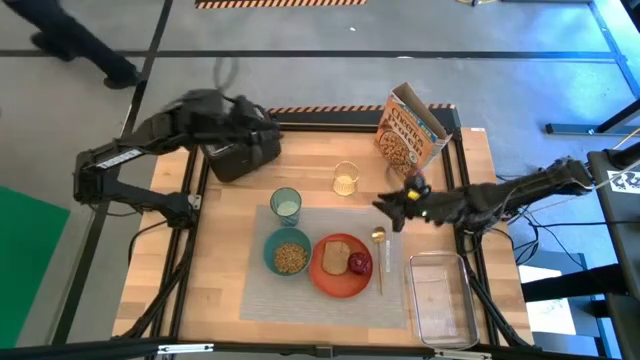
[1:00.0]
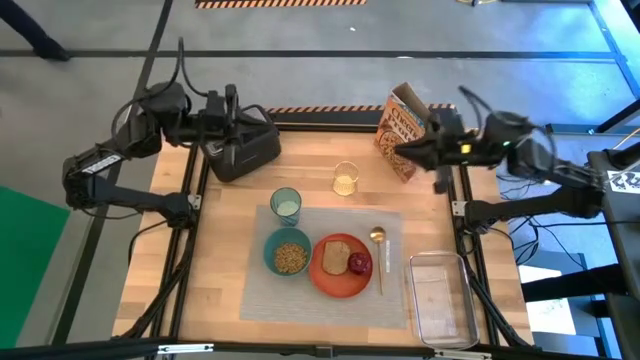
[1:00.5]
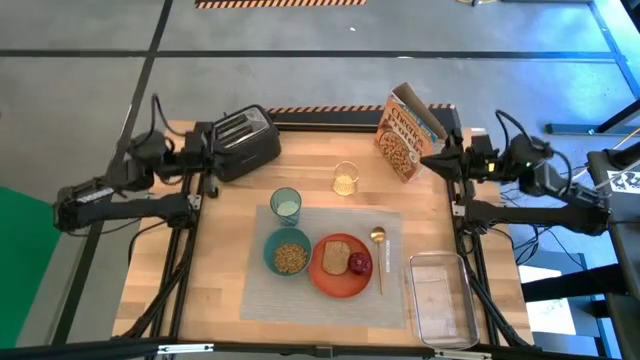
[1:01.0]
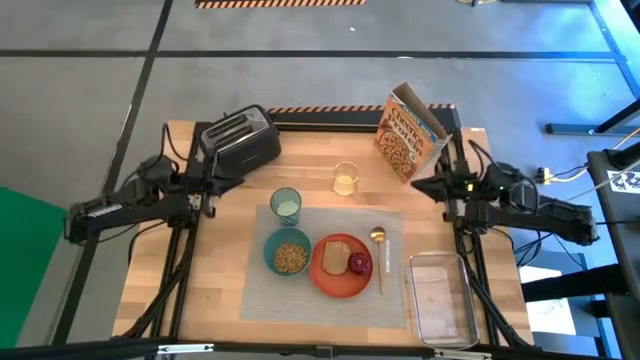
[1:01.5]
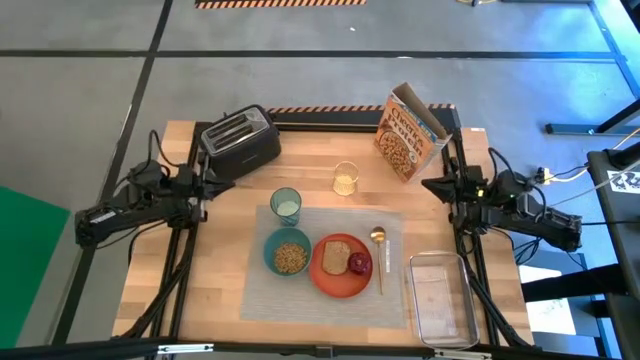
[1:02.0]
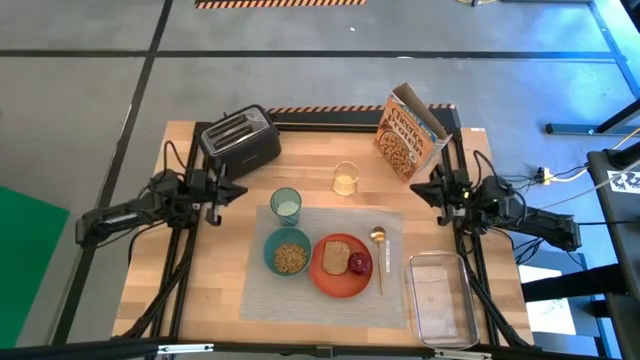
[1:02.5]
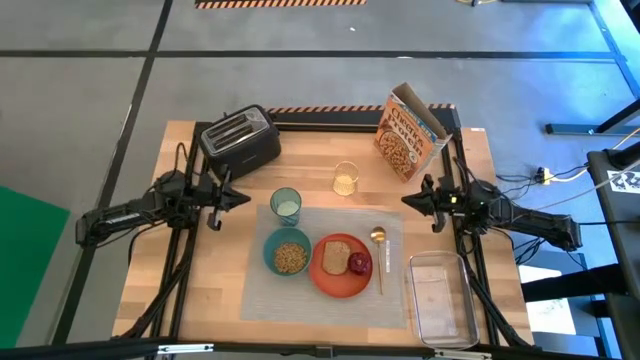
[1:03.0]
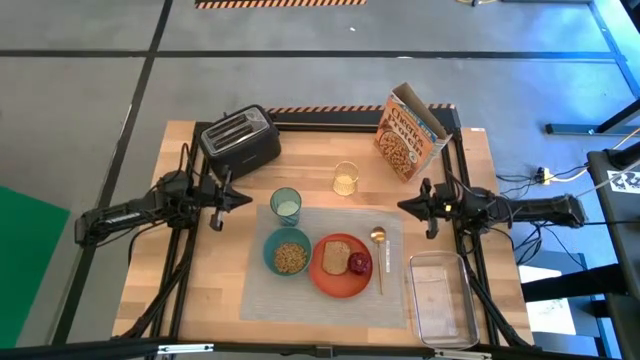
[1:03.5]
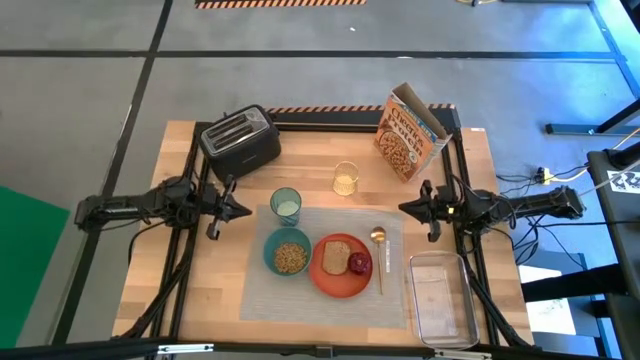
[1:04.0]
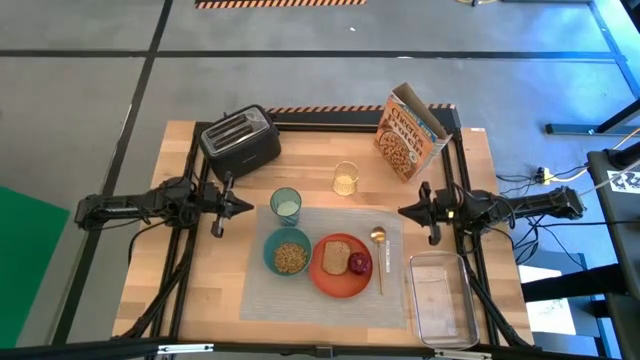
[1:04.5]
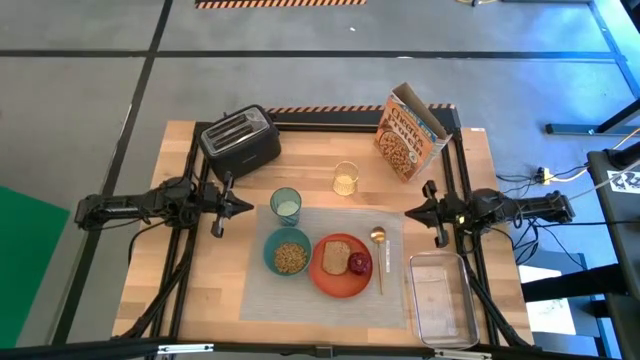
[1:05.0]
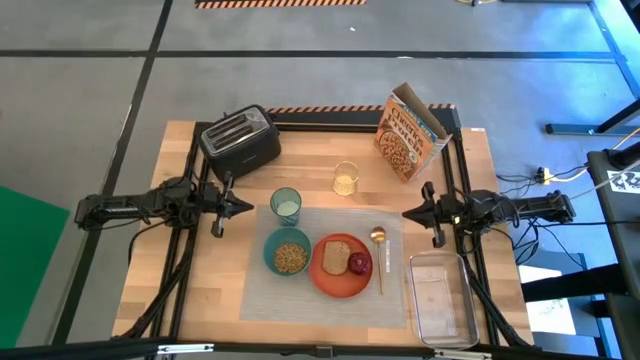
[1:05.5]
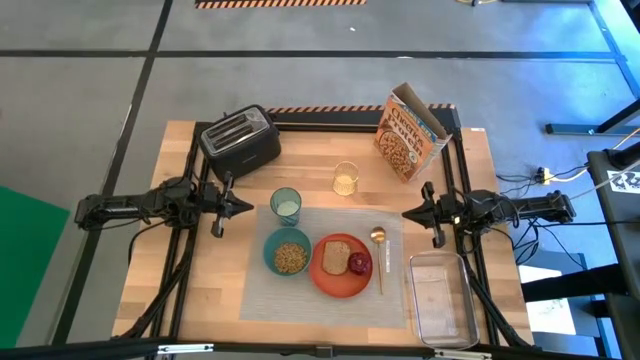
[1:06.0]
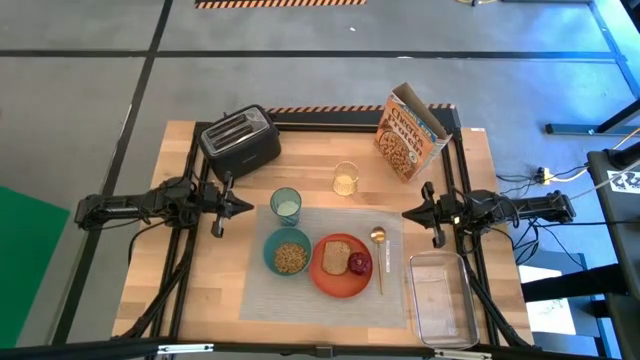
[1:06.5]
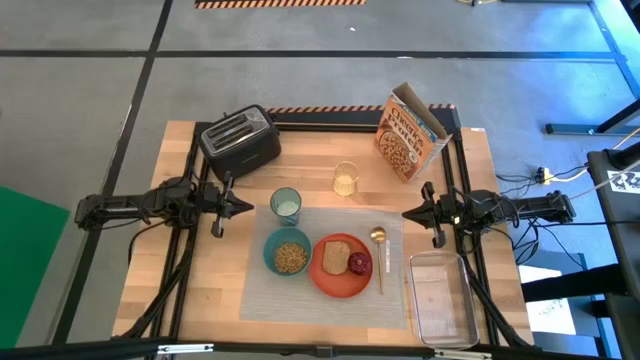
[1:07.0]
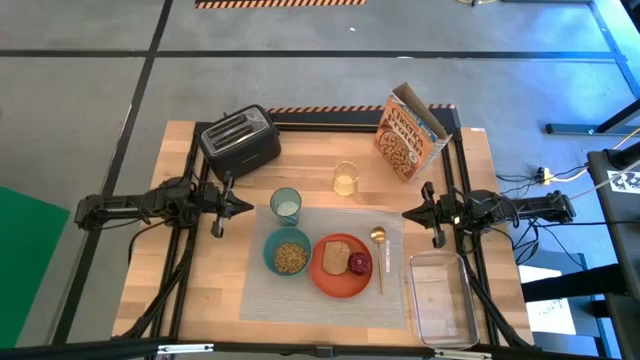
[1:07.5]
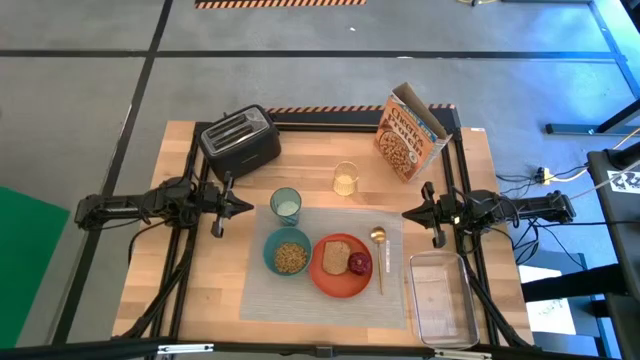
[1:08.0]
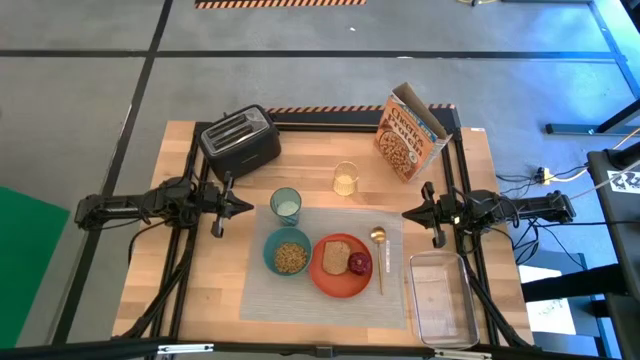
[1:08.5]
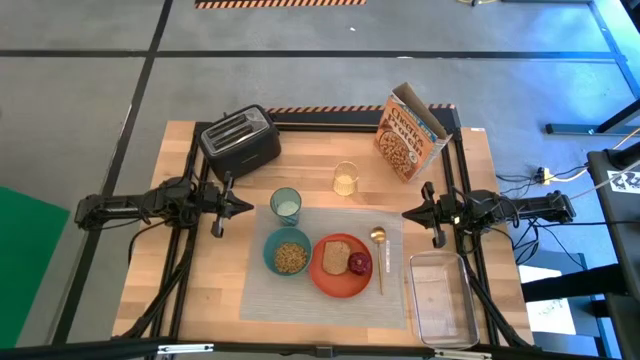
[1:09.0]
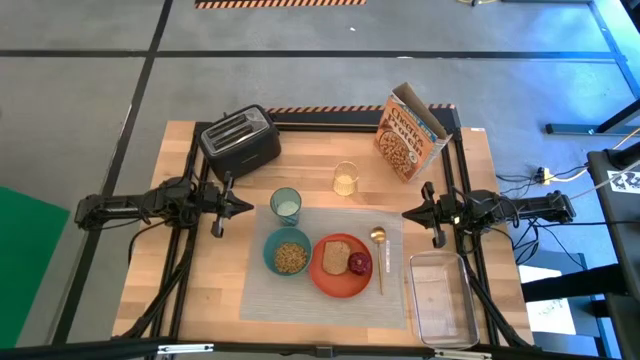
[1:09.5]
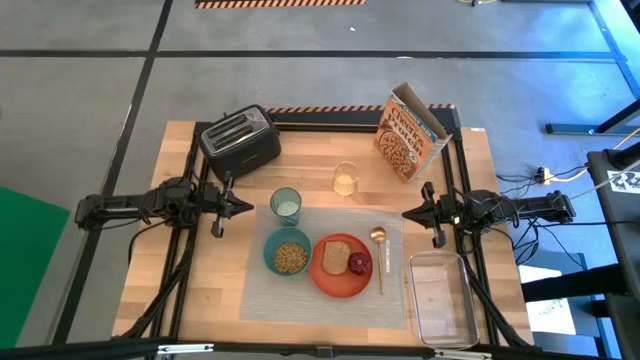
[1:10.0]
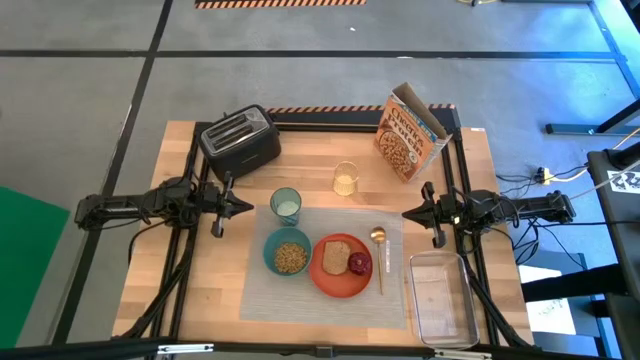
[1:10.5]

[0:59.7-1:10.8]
Task: Arrange a breakfast setting
Return to Home Position

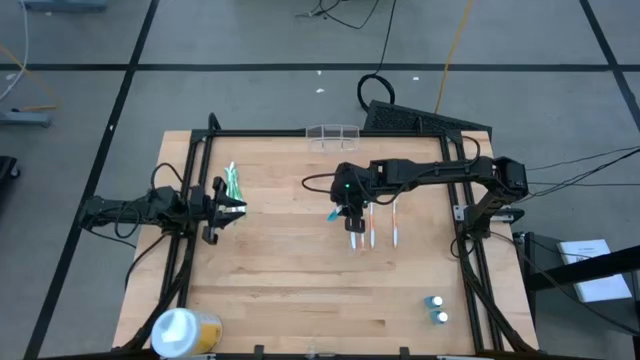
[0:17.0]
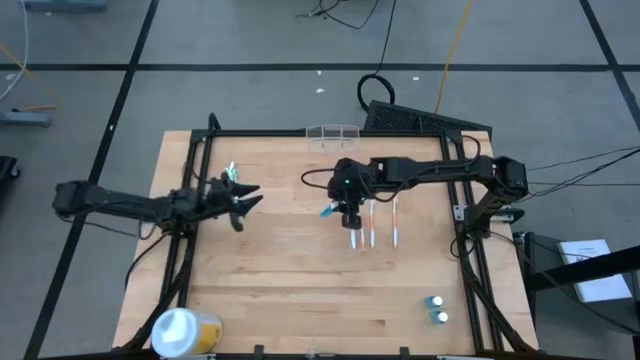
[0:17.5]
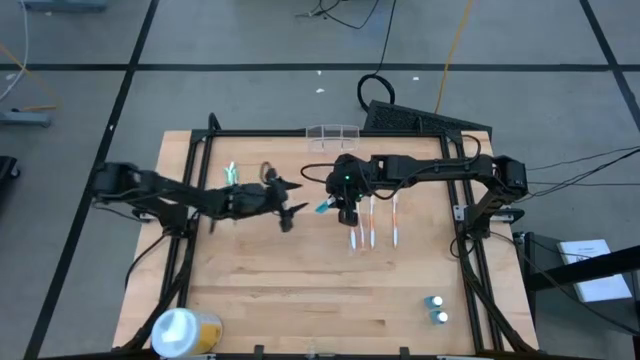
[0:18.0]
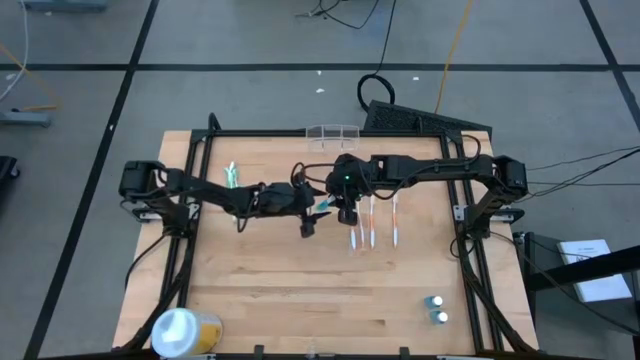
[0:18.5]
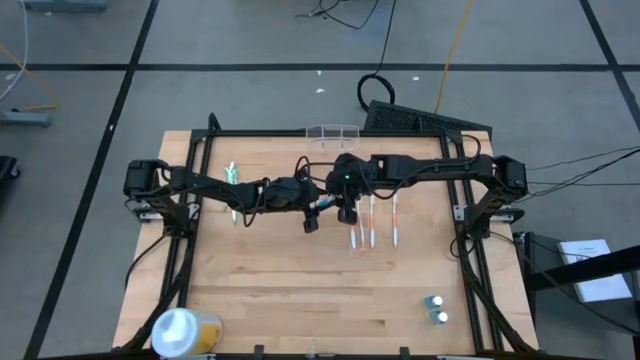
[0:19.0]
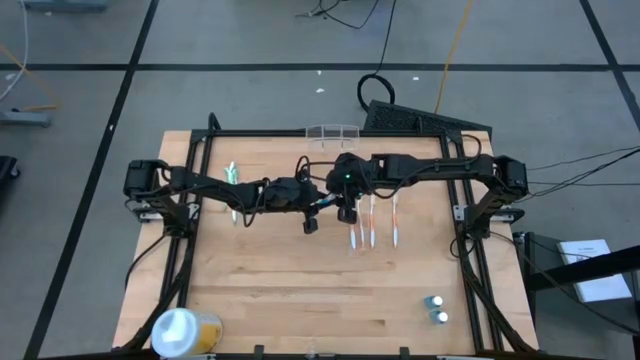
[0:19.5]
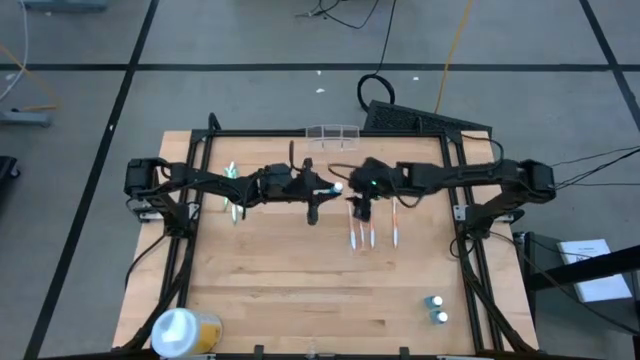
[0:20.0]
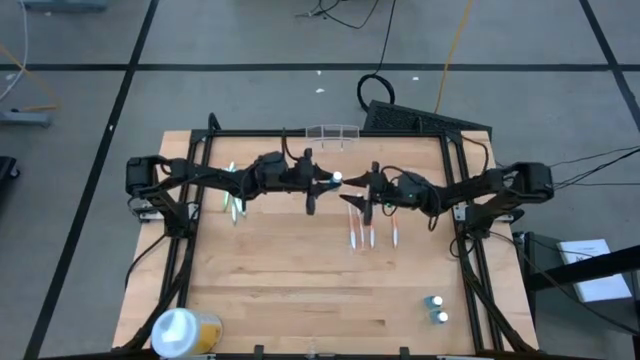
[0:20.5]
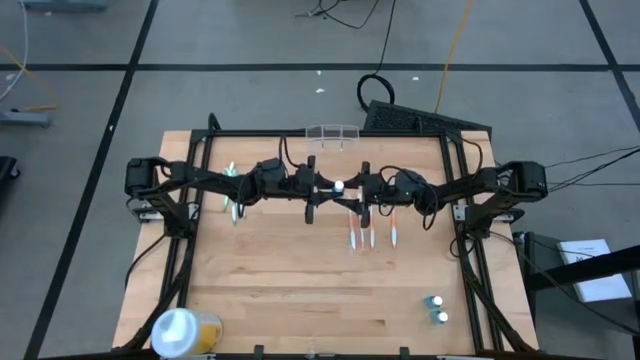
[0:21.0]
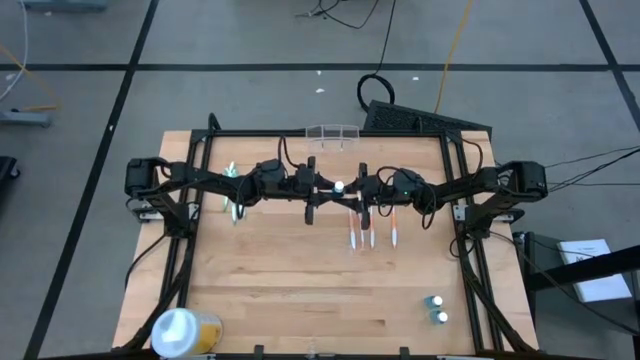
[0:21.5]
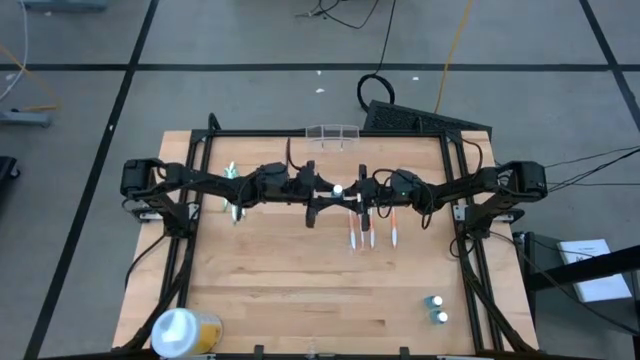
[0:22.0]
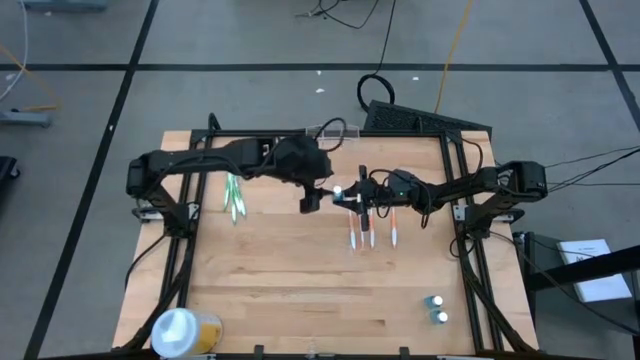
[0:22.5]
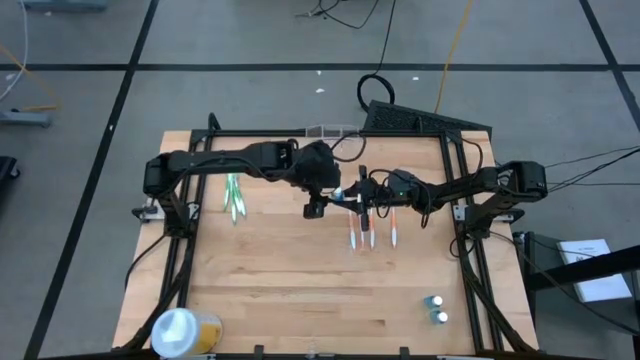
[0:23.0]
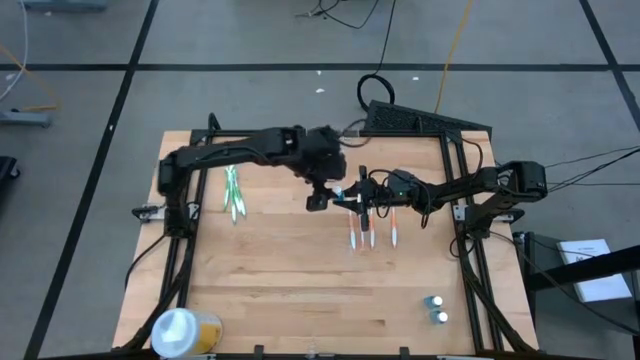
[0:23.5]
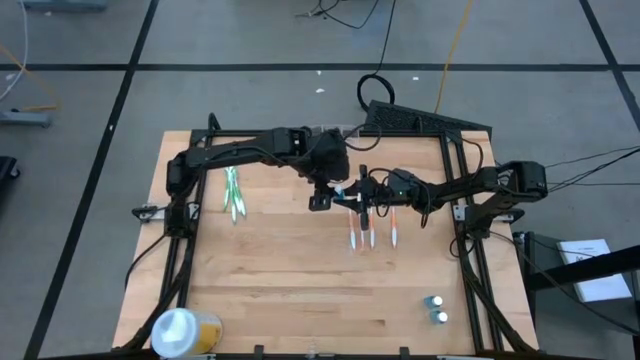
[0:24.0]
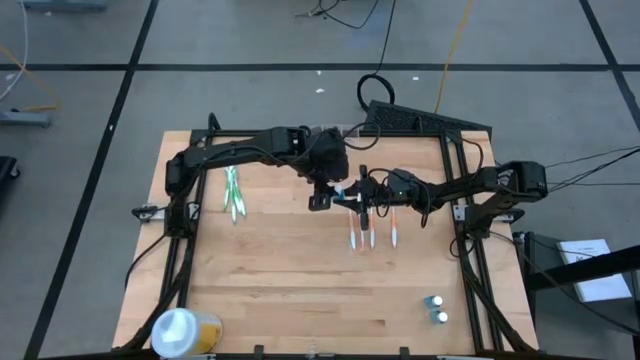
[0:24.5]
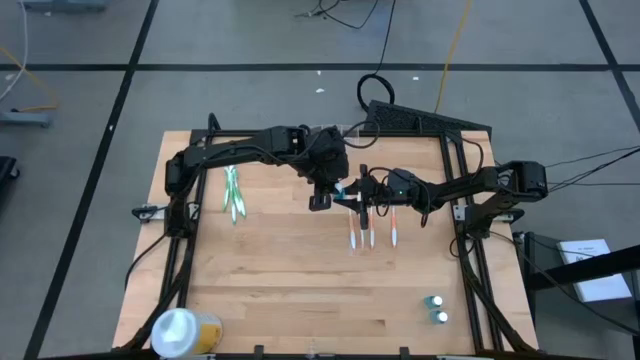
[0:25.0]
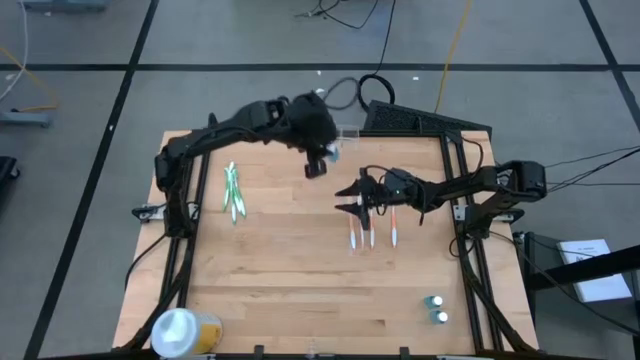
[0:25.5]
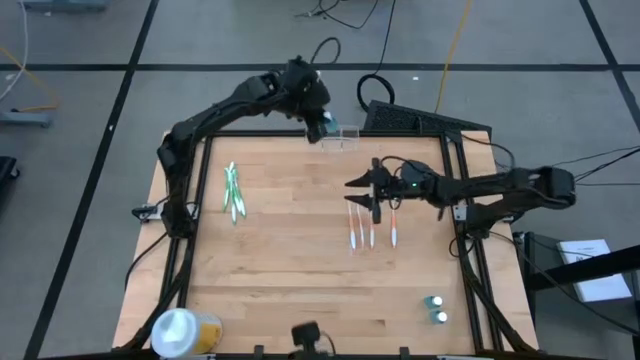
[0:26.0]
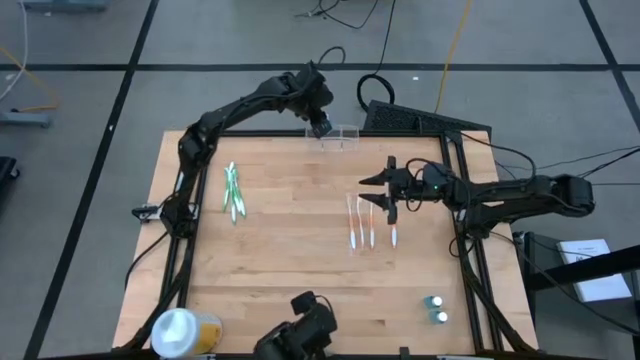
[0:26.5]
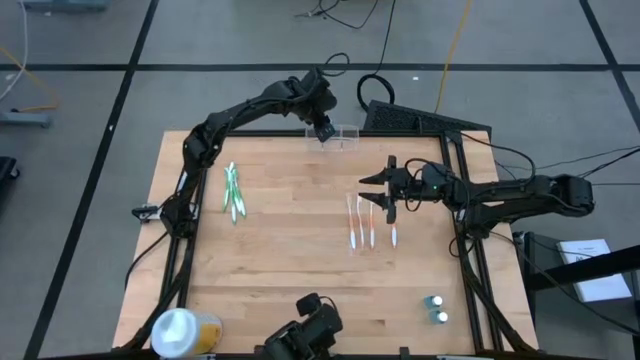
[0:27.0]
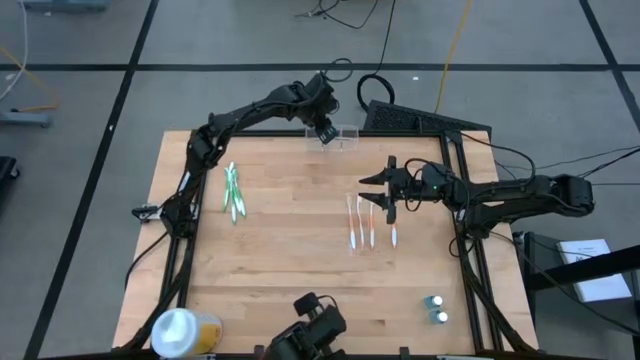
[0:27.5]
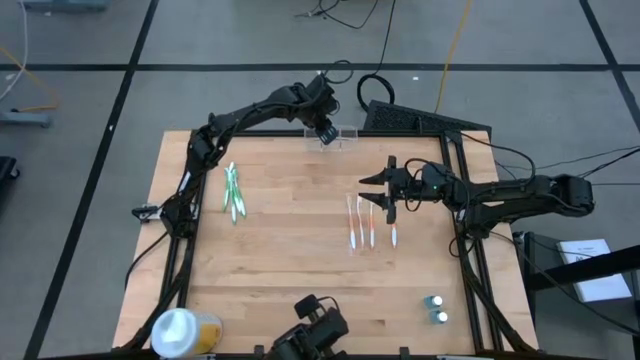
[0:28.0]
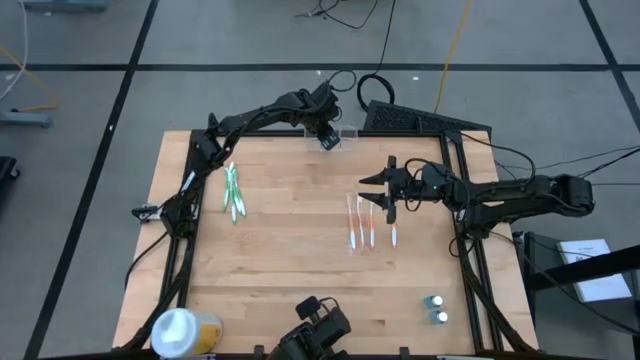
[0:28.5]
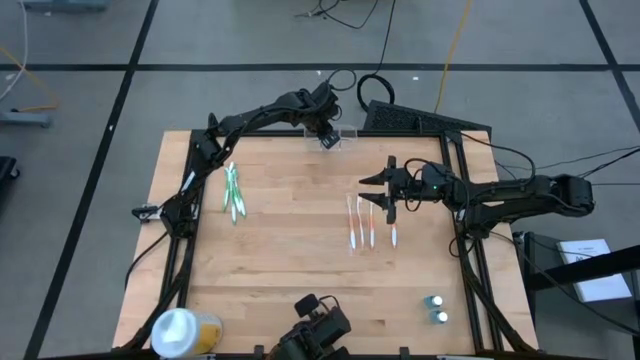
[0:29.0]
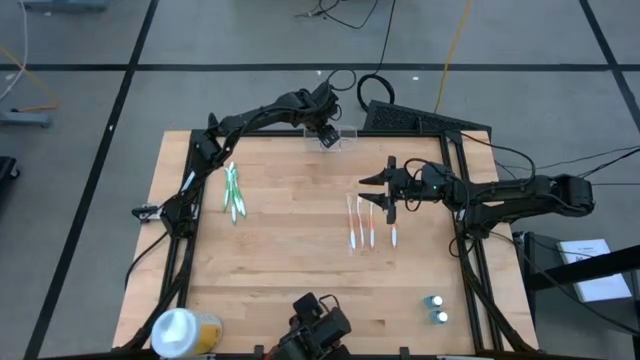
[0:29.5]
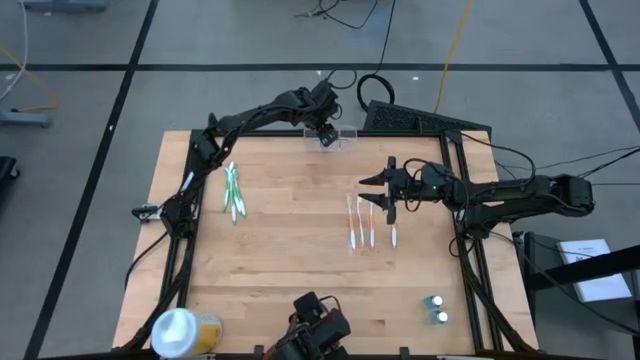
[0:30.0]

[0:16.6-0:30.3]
Task: Pick & Place toothbrushing station
Put the blue mouthwash into the transparent organizer
